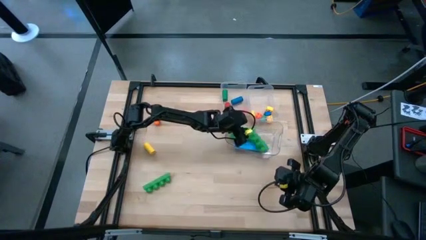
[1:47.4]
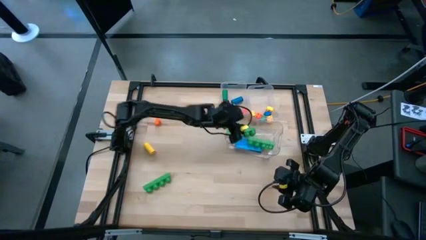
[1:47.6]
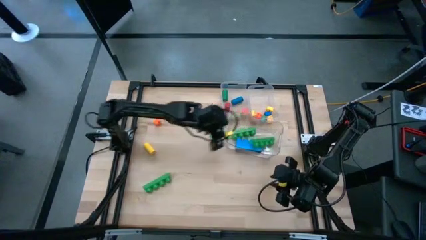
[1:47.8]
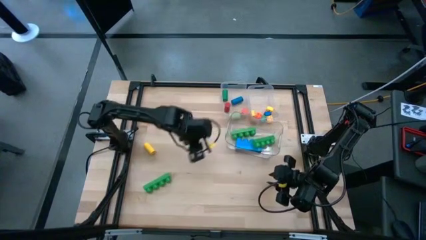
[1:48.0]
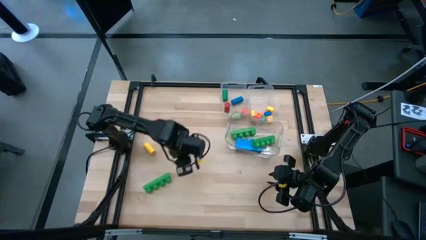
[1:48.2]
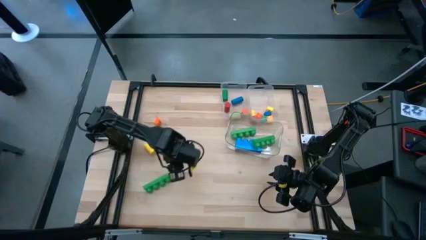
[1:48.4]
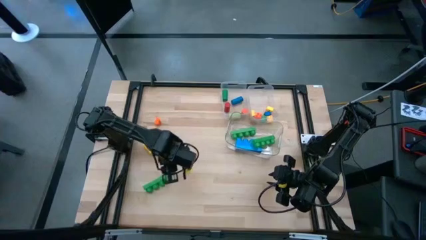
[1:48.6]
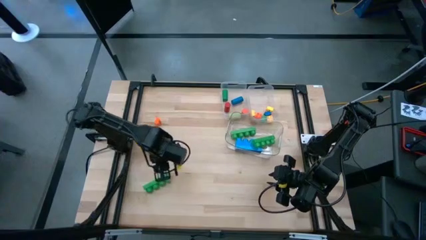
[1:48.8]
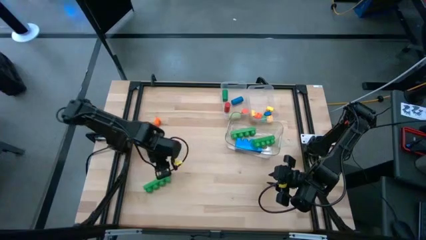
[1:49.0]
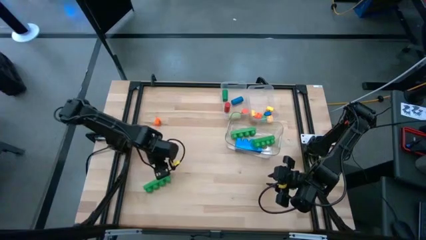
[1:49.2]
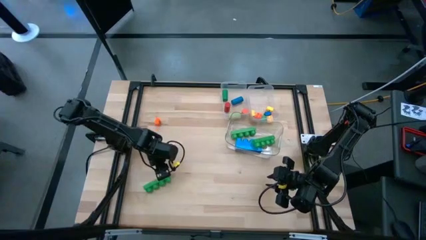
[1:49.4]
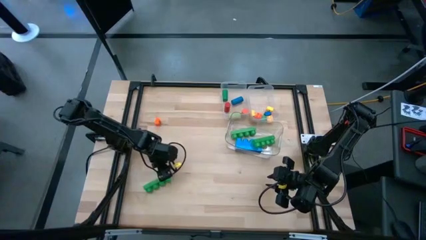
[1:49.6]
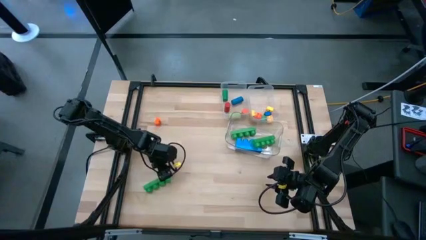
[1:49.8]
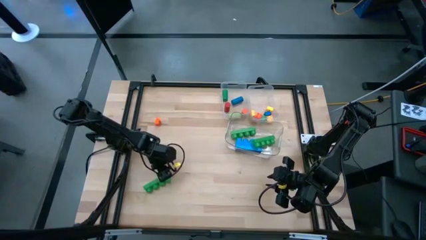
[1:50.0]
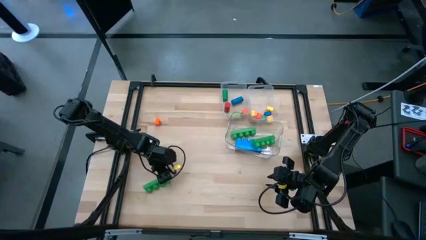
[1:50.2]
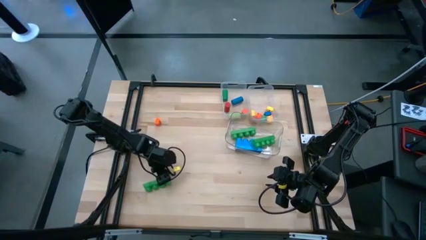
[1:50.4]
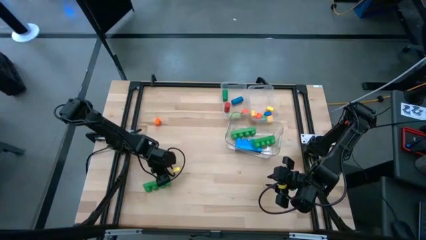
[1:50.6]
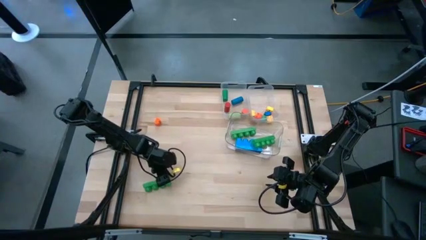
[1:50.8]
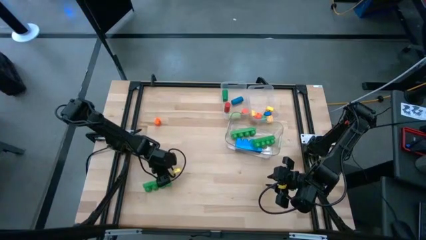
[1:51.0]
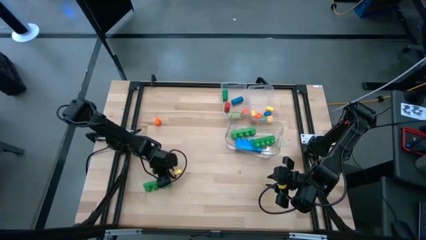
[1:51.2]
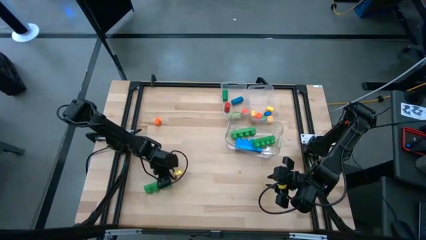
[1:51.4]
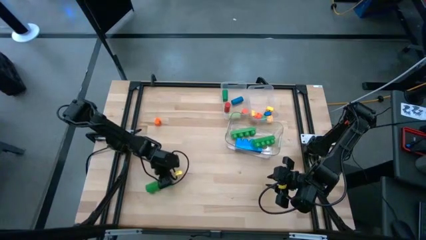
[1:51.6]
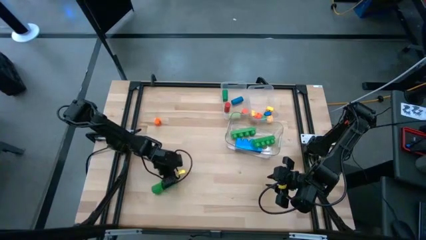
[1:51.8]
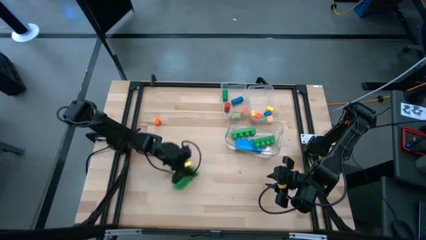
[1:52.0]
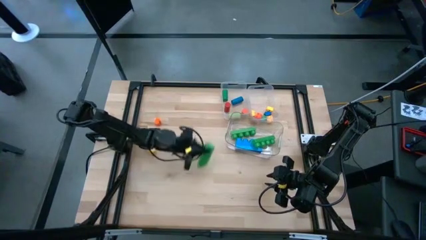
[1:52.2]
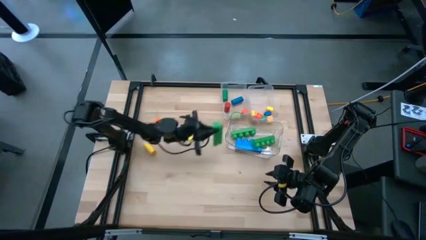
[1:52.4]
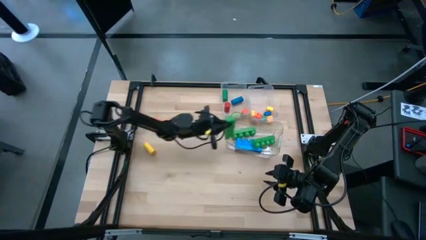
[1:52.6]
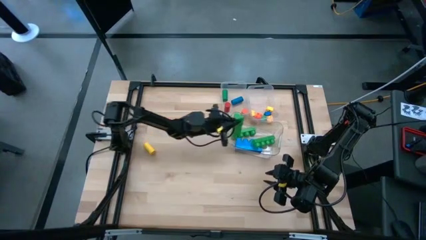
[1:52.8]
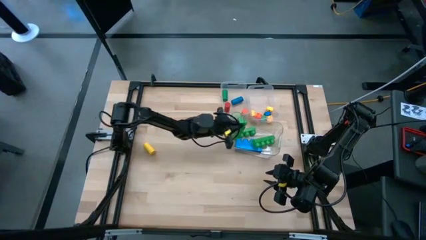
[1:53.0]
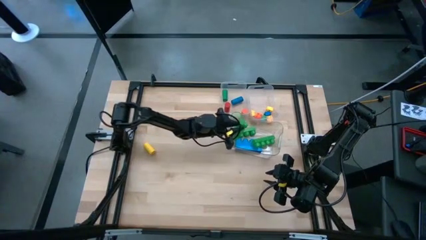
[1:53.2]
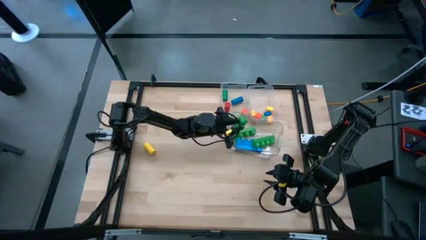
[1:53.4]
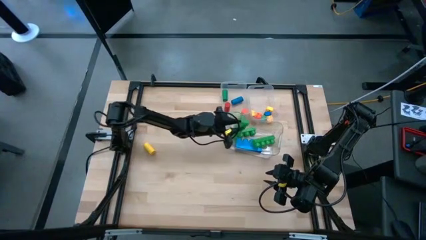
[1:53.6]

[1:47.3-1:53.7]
Task: Sort blocks by size
Put the large green 4 stud game piece into the bottom transparent bin

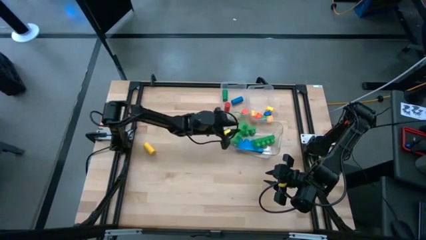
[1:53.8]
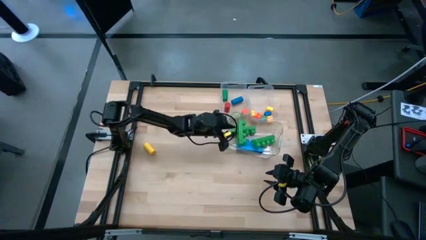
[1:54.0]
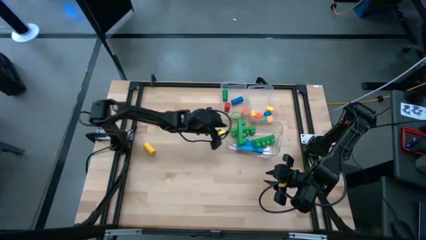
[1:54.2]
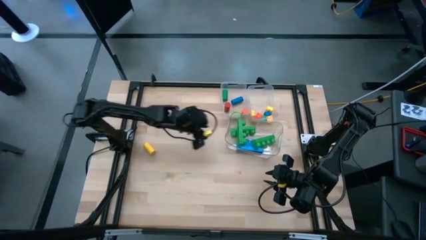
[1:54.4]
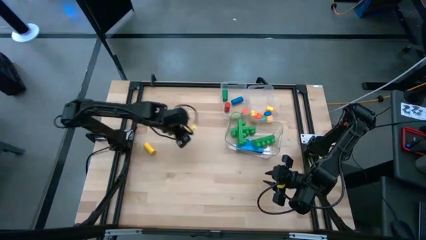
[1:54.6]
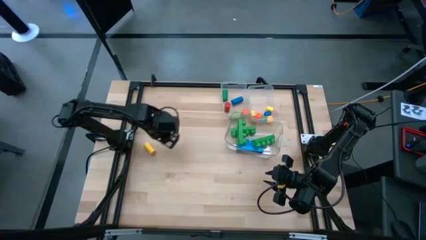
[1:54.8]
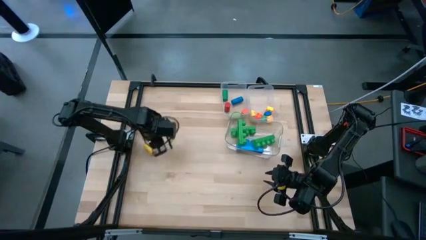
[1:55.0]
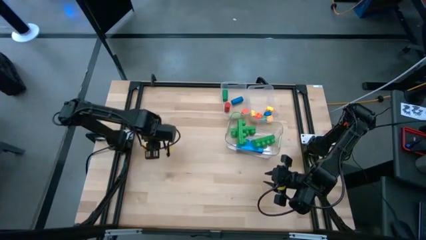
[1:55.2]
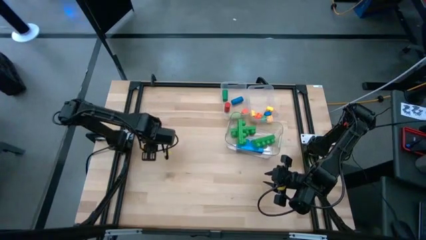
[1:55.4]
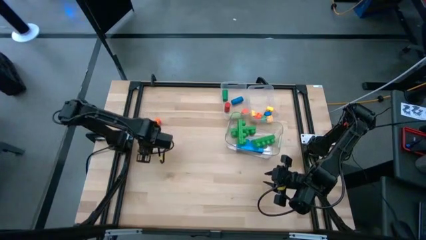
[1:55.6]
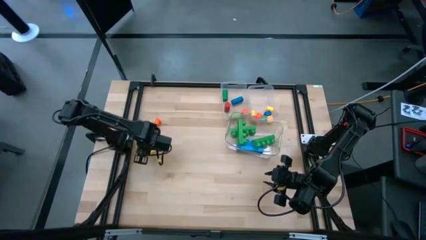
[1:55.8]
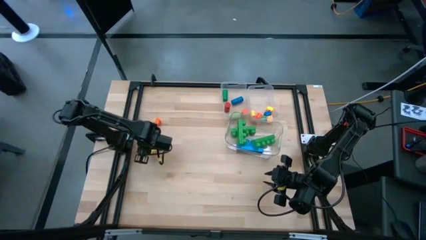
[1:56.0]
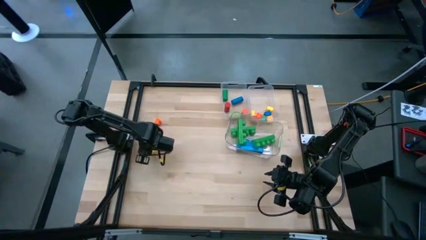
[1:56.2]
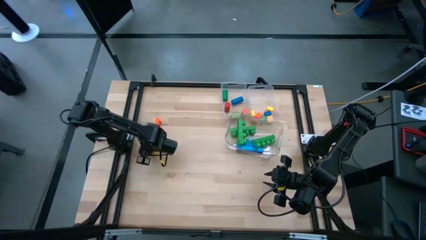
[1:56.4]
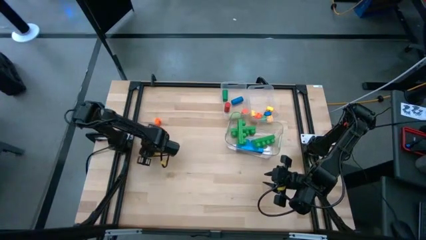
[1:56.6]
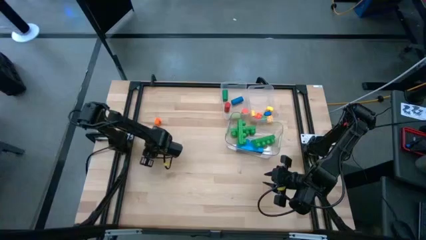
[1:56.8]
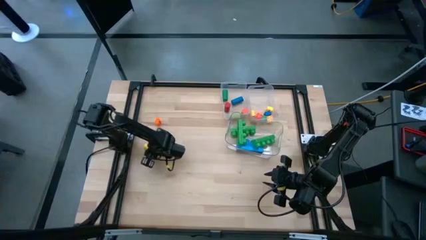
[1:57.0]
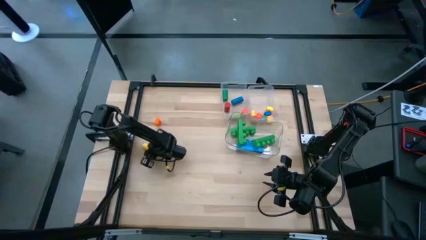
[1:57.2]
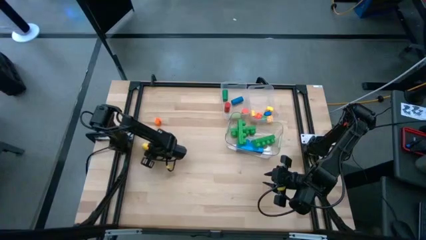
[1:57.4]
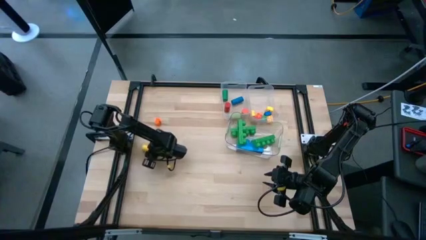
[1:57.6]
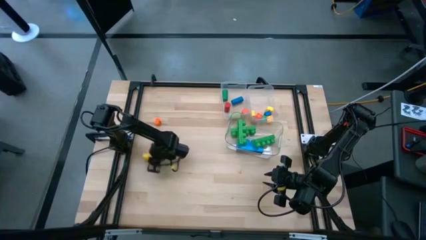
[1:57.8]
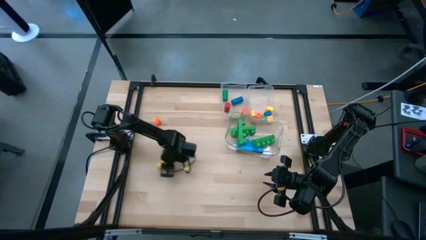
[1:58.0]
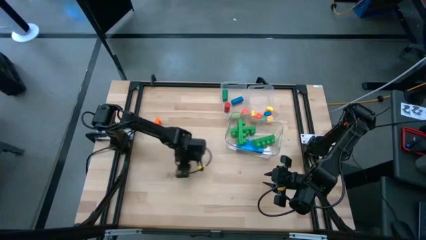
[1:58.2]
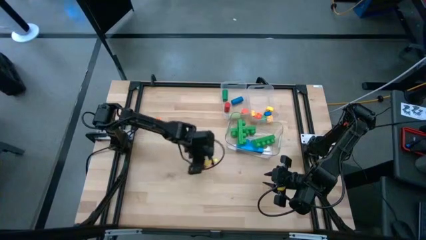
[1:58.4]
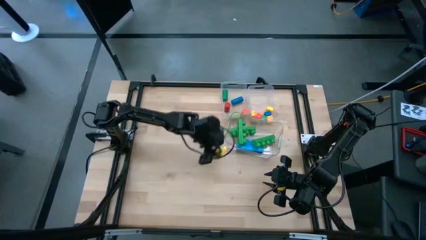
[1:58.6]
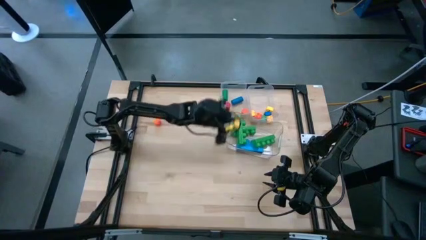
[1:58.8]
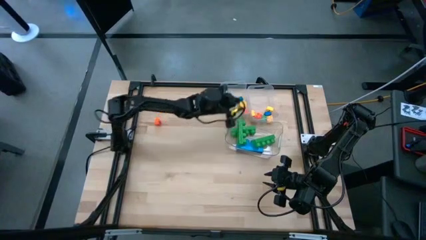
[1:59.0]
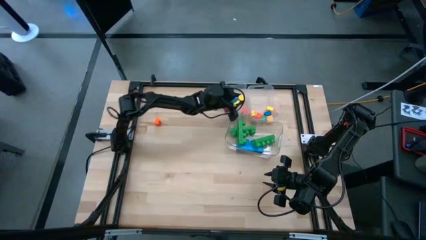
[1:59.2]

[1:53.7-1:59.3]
Put the yellow cylindrical block into the left transparent bin

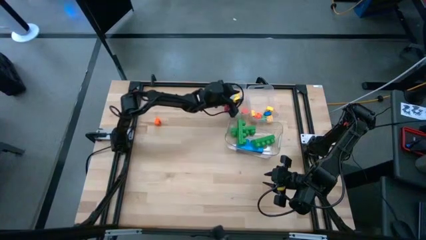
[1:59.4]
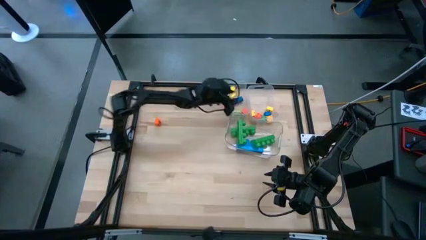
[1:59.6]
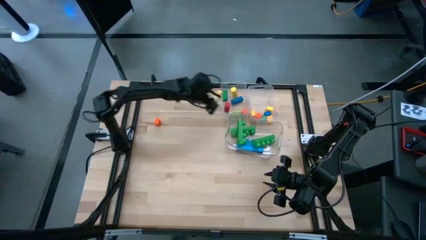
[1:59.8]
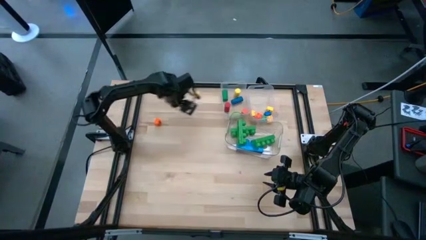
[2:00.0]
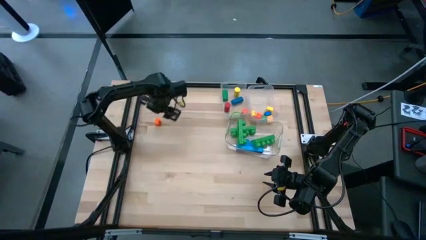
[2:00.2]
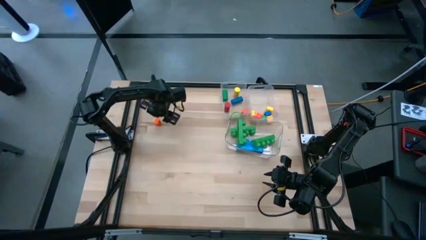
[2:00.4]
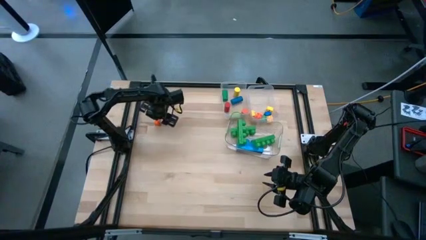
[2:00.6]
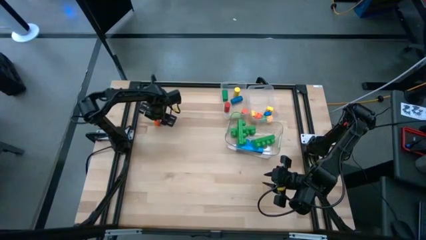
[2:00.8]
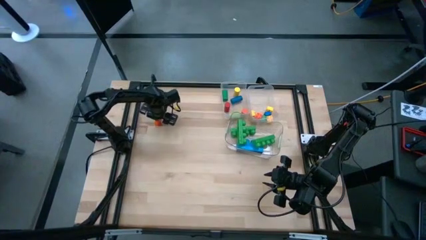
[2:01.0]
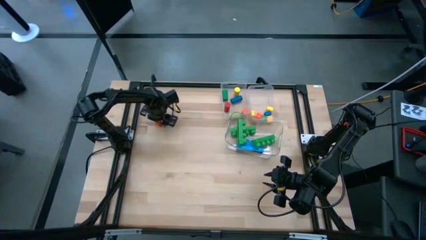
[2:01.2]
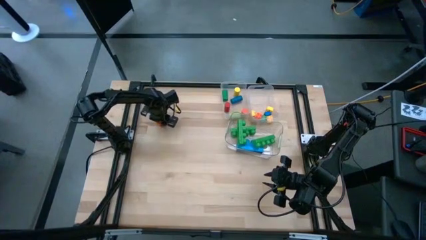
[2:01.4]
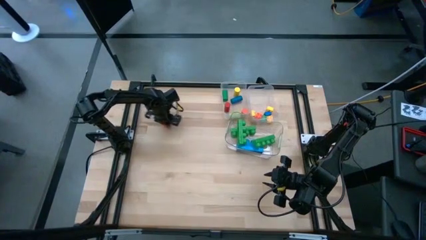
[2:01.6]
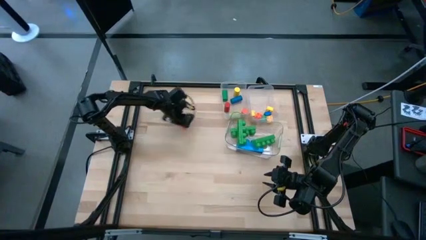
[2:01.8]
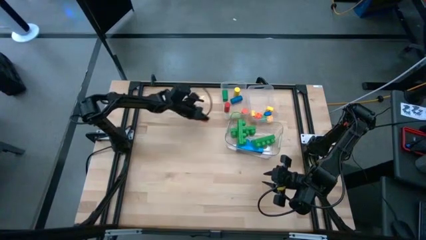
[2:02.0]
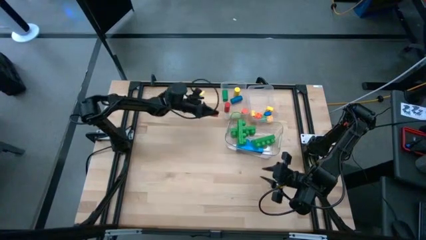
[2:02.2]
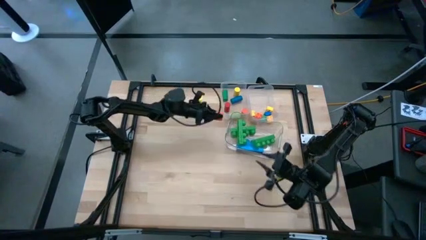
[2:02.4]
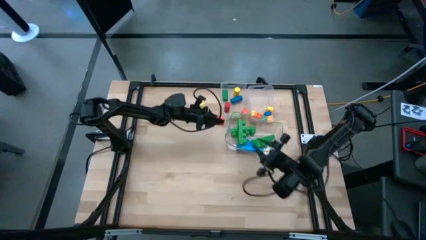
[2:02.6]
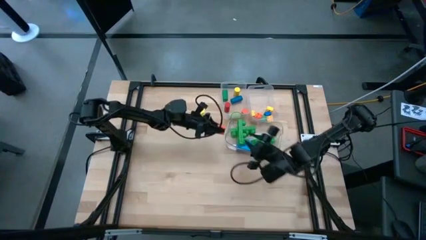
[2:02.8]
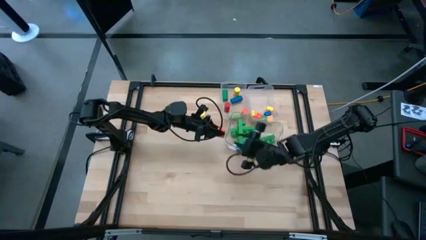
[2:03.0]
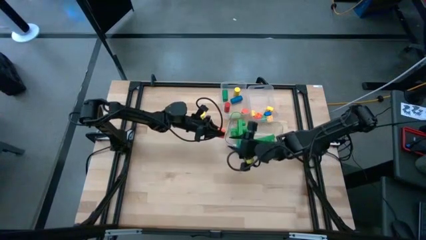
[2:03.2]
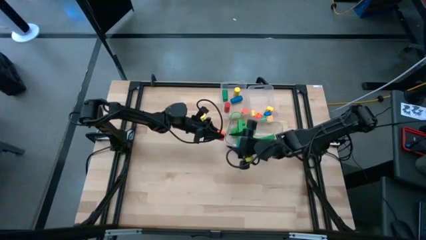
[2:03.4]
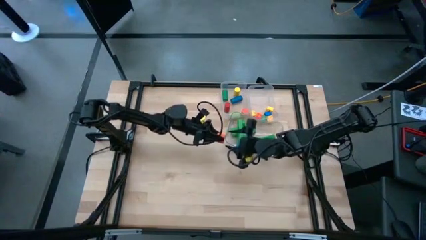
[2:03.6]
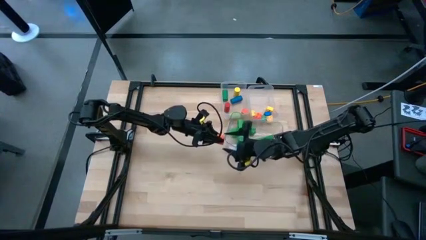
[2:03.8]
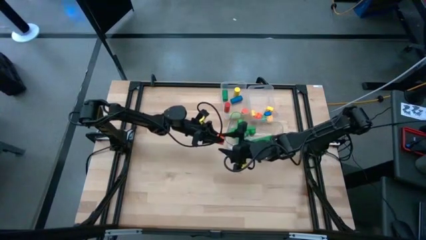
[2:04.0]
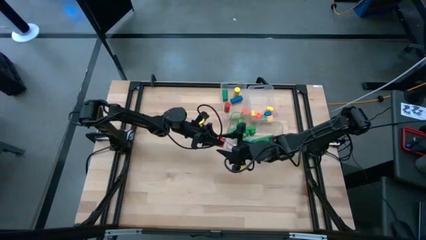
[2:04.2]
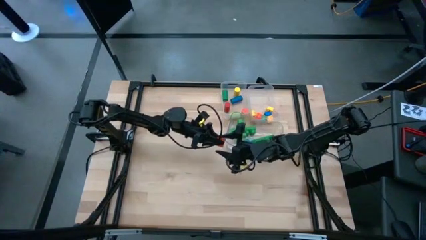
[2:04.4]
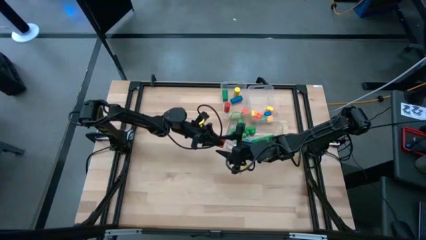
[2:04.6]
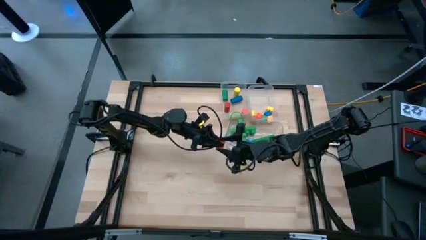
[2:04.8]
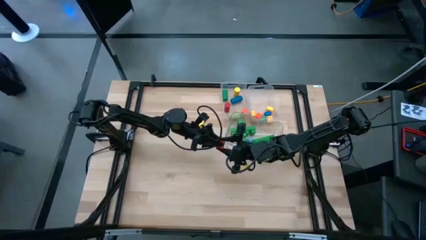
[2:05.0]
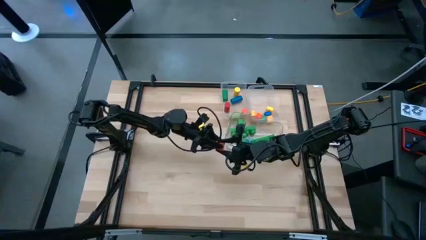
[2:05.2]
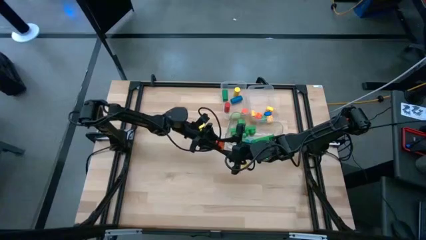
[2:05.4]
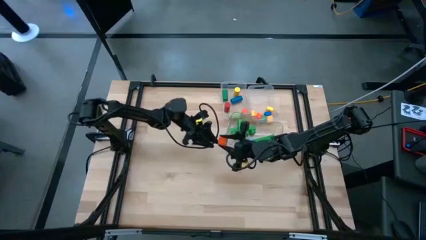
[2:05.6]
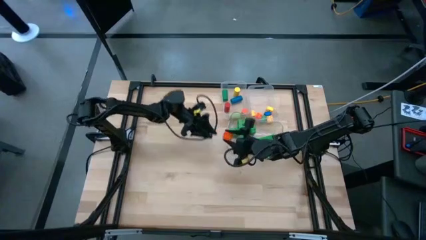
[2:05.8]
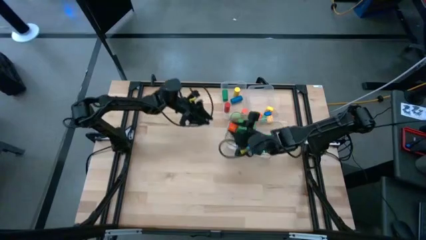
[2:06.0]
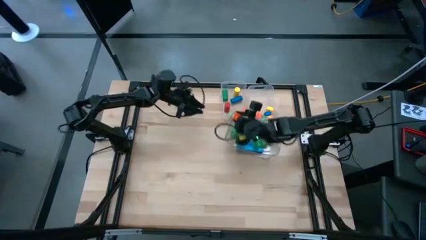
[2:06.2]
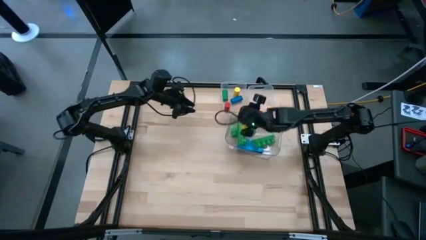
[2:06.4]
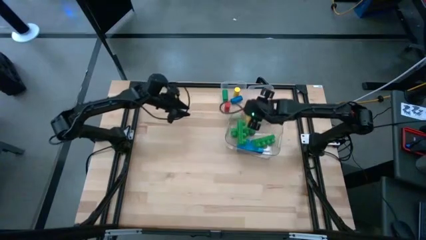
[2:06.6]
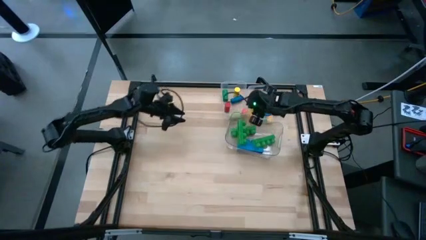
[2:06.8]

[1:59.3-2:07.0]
Put the small orange 4 stud game piece into the right transparent bin
